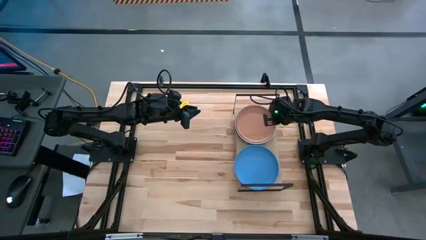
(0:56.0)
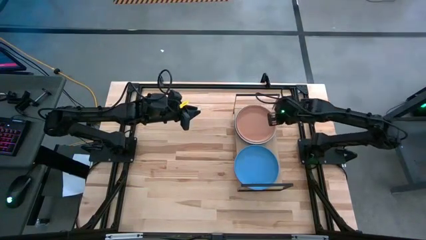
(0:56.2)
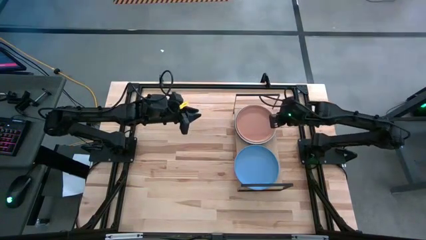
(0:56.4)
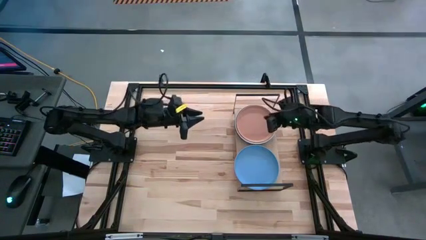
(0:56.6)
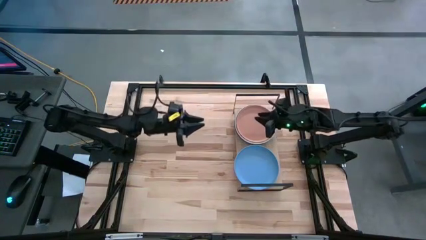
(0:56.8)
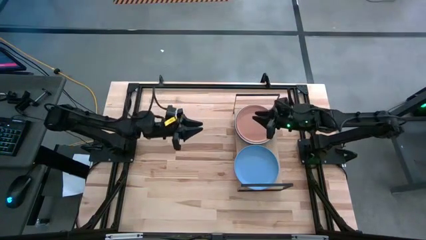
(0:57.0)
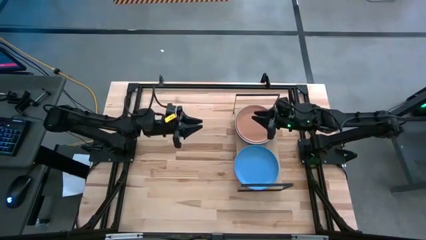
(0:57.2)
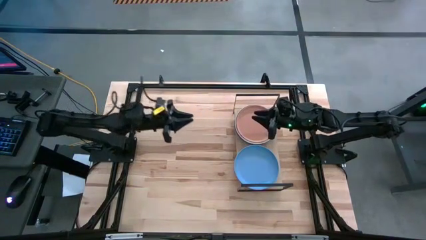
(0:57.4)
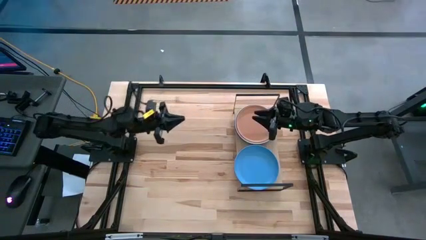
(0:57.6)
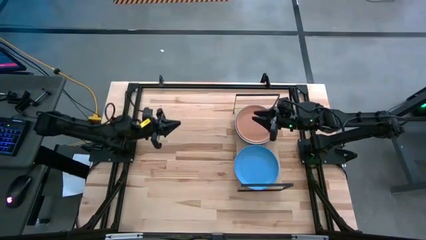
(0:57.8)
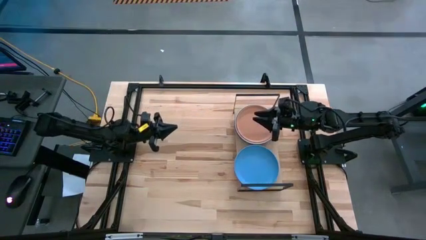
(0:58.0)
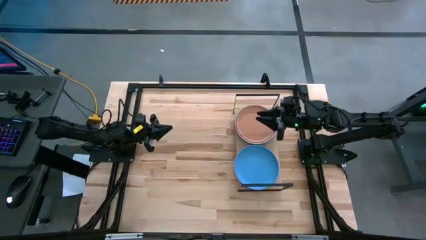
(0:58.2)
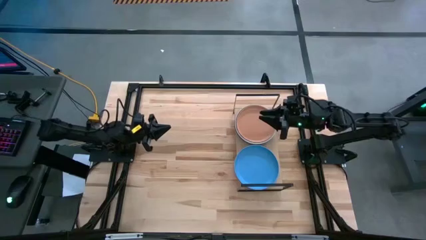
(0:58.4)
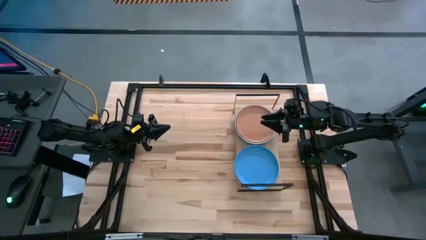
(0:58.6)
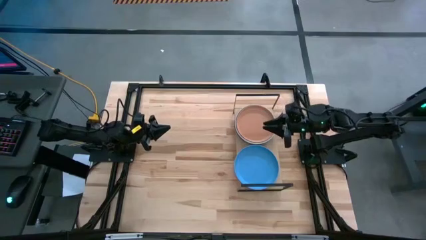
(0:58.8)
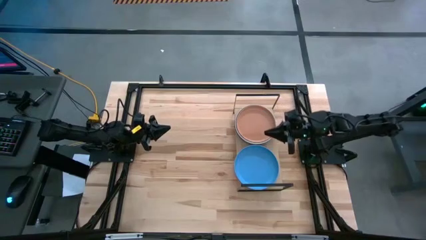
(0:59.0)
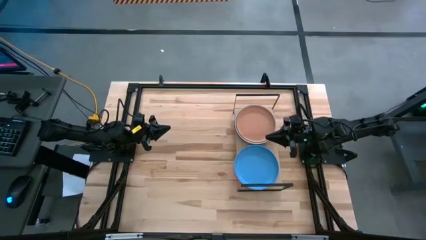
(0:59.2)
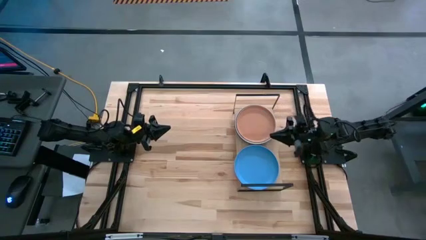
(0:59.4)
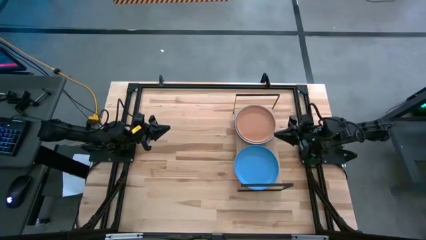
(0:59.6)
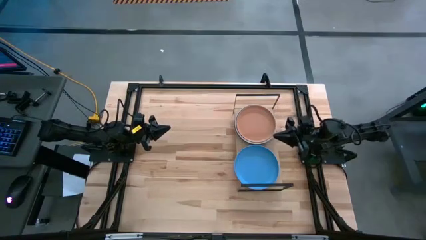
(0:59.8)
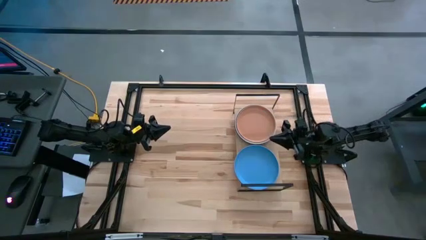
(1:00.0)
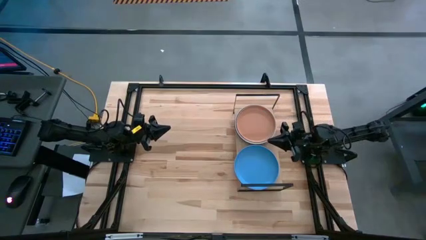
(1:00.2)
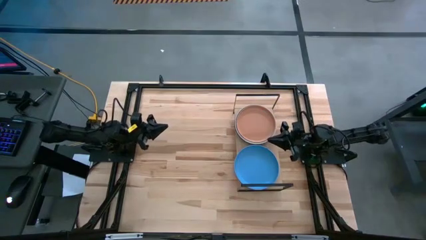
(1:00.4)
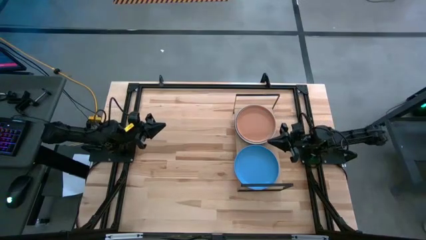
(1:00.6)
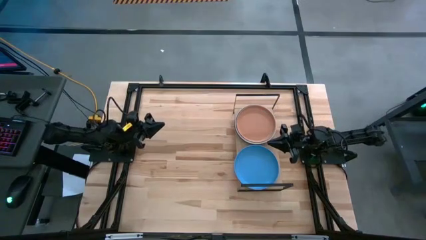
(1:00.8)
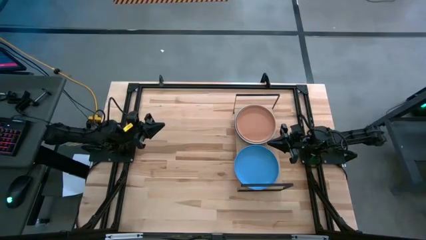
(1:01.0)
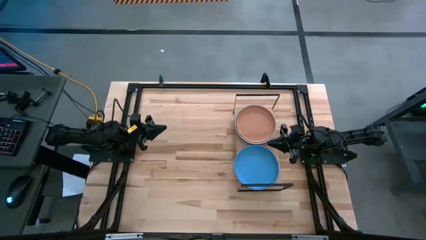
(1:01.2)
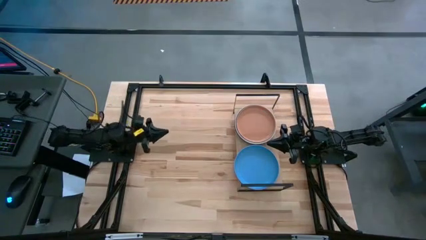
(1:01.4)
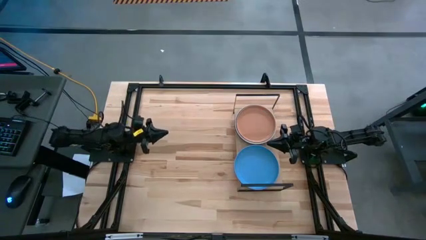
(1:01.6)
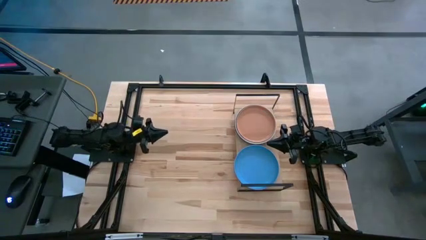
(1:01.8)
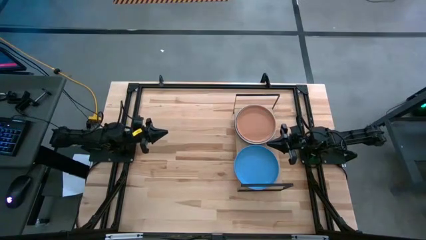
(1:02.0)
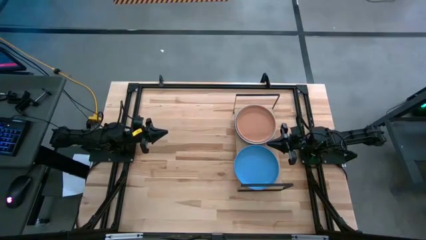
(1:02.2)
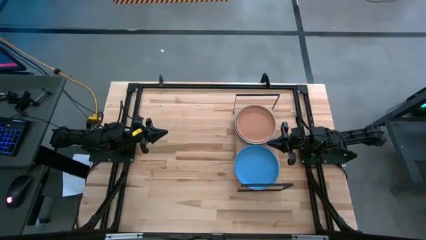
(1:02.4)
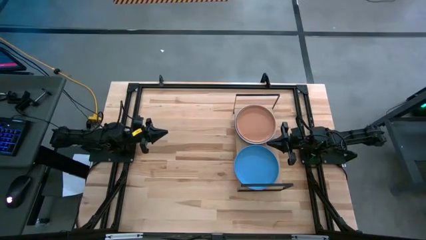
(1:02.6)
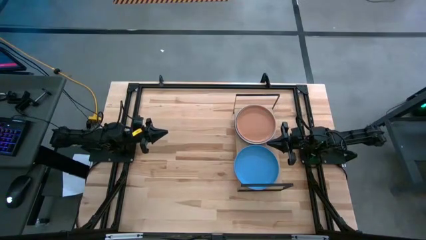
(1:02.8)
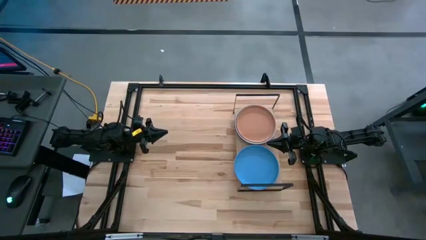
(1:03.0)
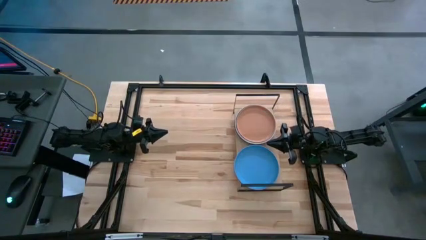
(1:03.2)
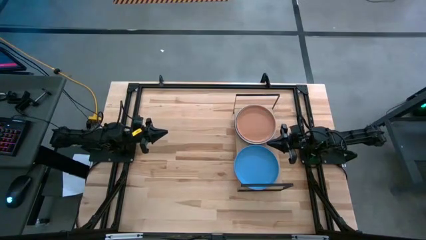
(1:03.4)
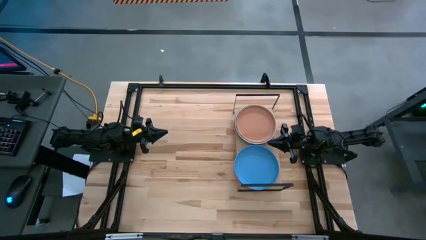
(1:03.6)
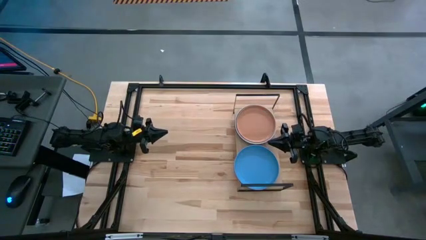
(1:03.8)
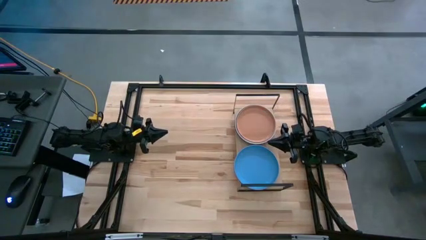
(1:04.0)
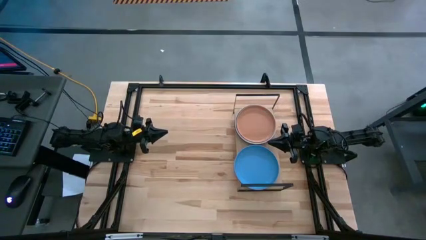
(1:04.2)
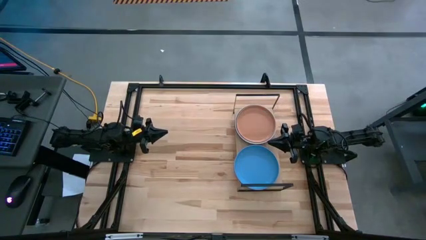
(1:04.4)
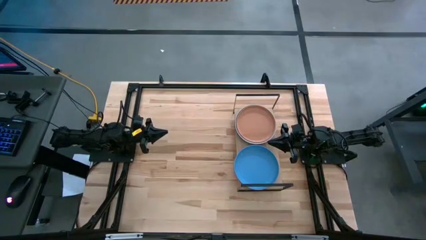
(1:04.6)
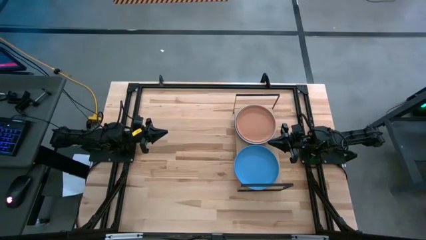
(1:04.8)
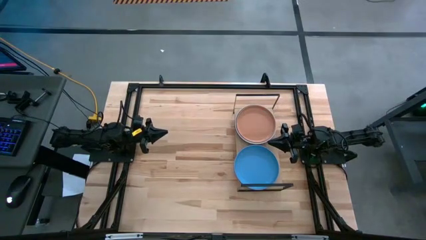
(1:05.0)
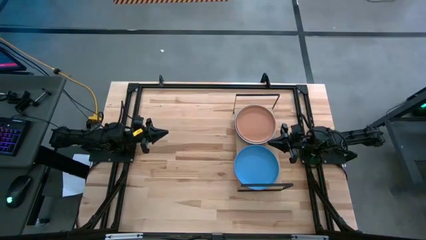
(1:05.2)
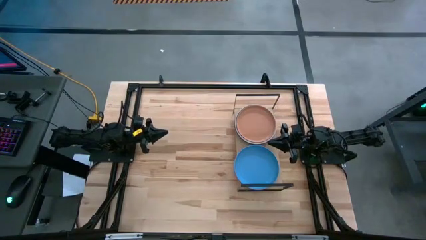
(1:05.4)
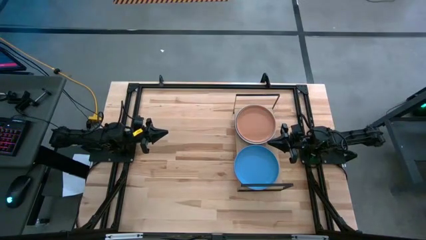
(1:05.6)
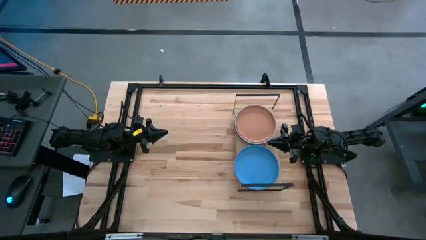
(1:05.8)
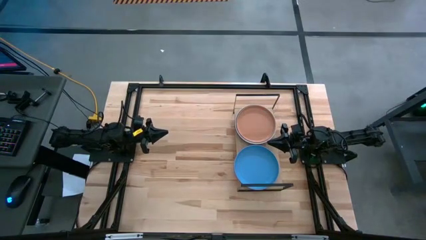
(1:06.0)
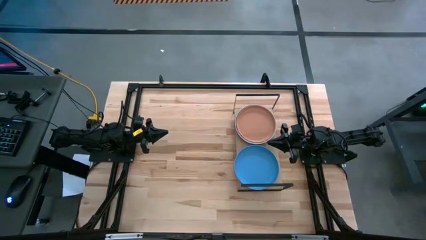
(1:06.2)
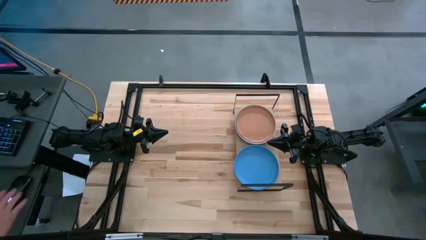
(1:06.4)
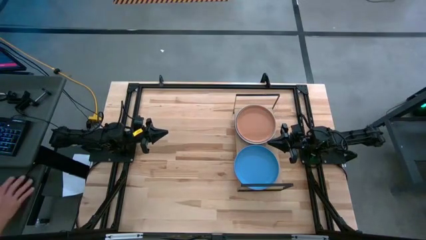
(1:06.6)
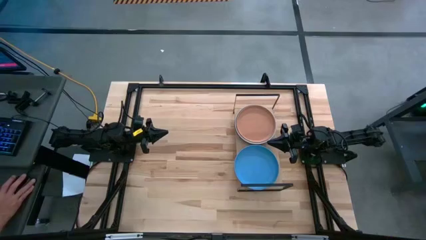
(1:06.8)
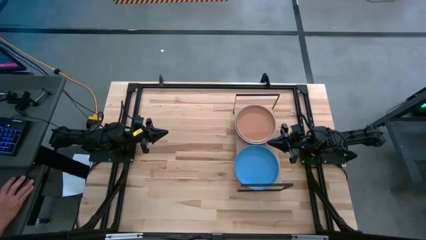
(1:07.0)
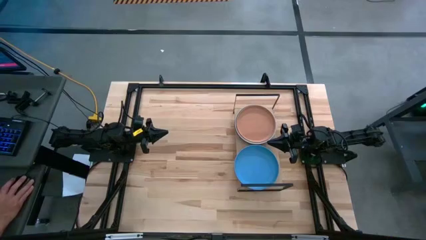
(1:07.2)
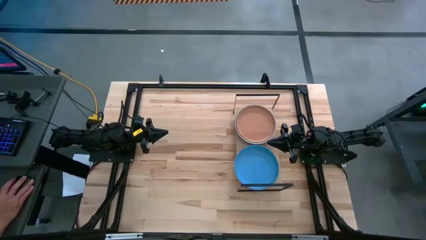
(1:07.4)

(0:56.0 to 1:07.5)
Task: Place and stack plates onto a shelf
Return to Home Position

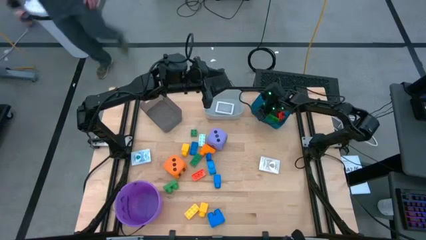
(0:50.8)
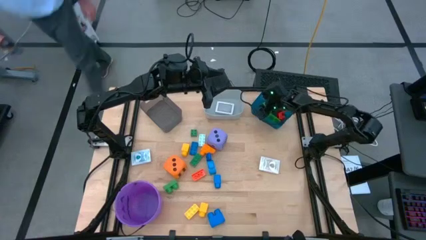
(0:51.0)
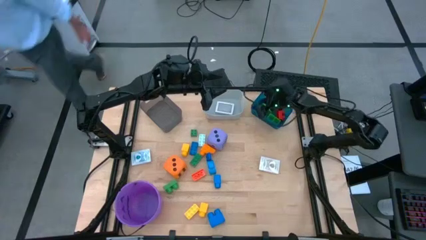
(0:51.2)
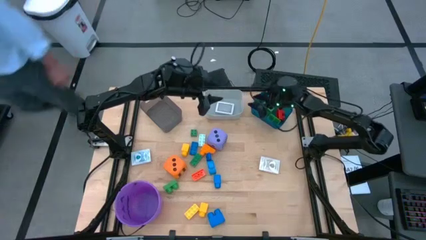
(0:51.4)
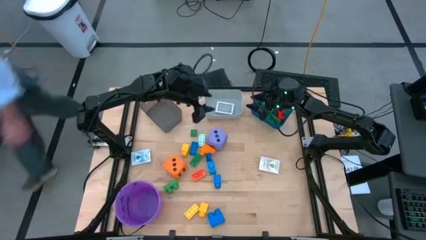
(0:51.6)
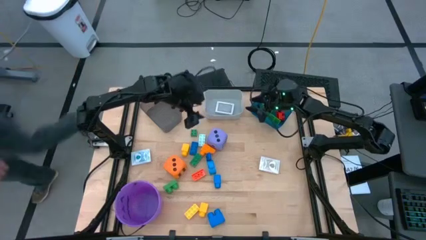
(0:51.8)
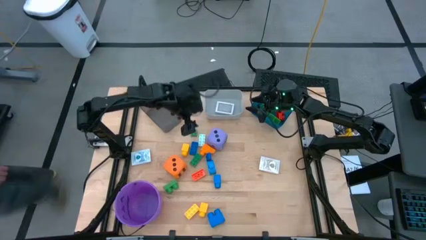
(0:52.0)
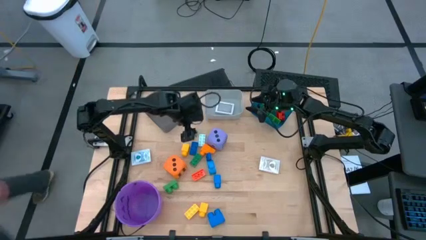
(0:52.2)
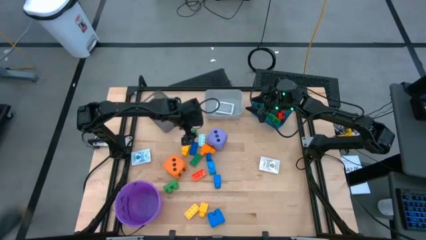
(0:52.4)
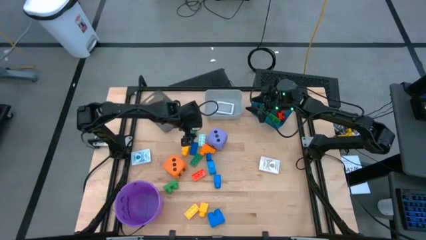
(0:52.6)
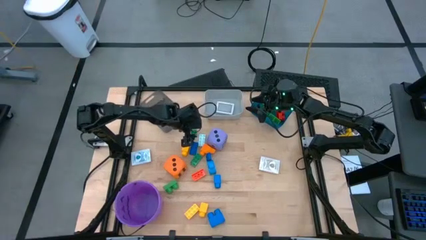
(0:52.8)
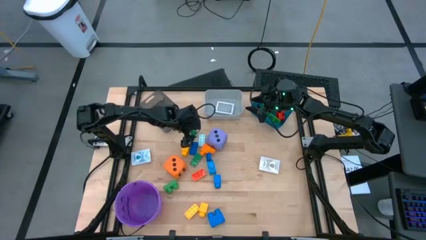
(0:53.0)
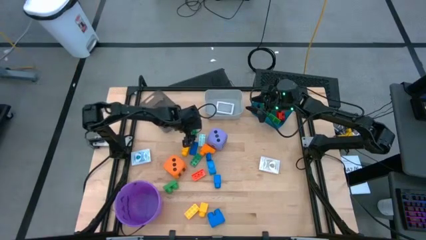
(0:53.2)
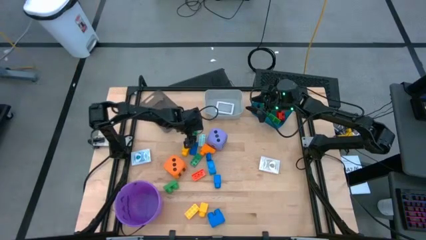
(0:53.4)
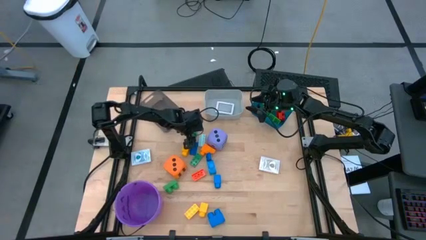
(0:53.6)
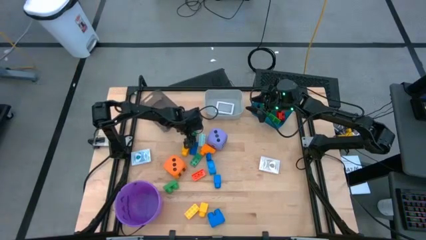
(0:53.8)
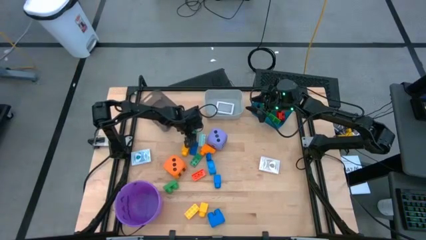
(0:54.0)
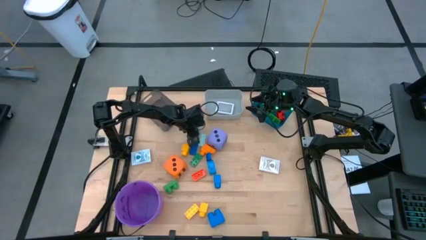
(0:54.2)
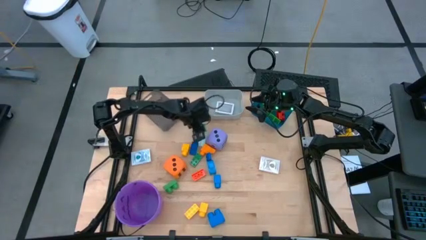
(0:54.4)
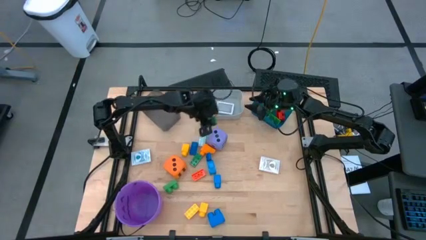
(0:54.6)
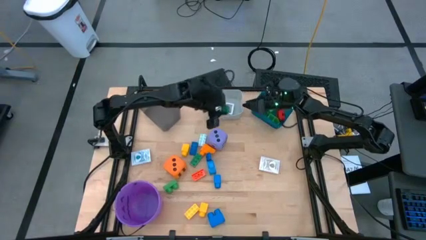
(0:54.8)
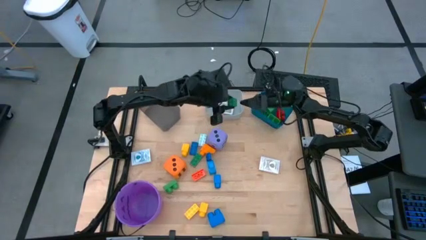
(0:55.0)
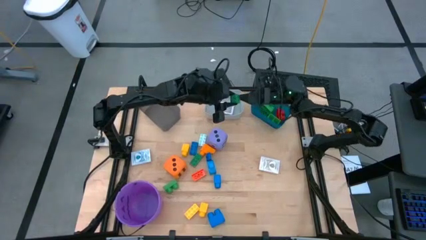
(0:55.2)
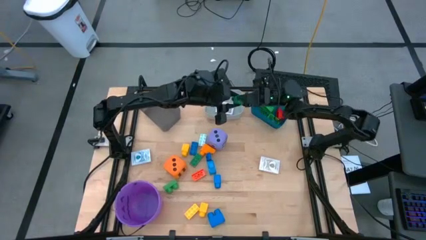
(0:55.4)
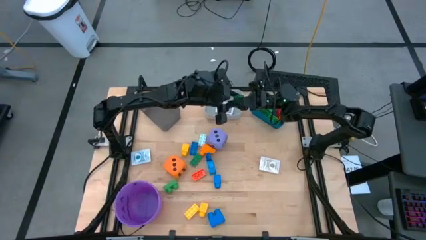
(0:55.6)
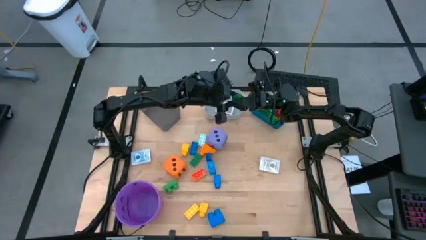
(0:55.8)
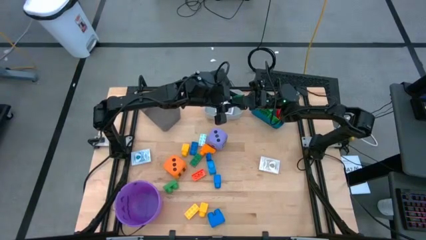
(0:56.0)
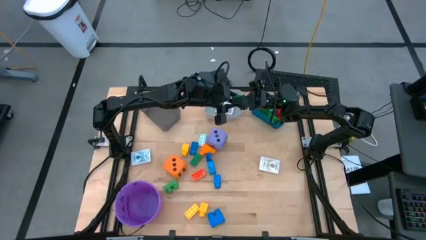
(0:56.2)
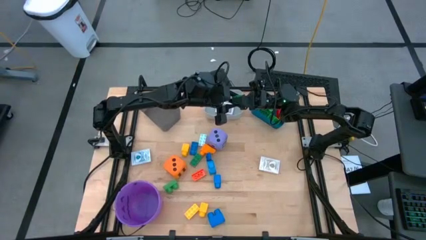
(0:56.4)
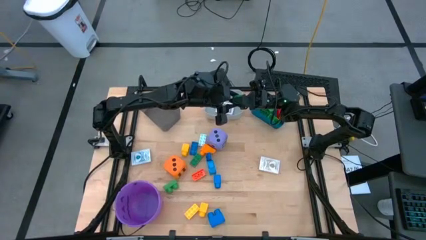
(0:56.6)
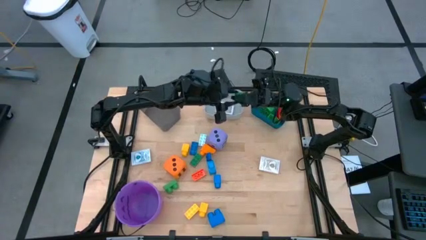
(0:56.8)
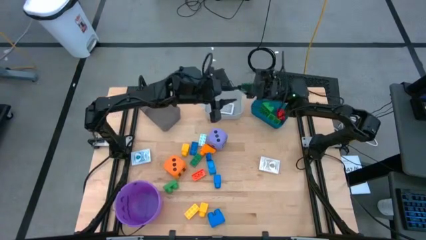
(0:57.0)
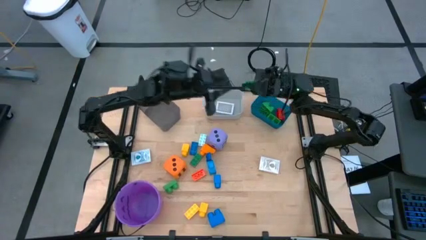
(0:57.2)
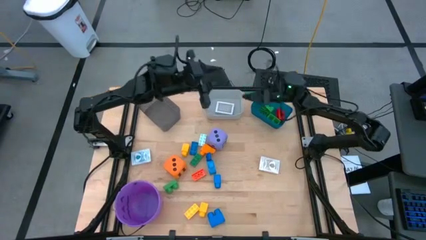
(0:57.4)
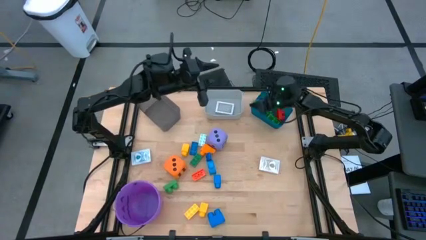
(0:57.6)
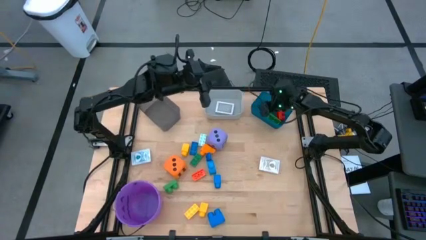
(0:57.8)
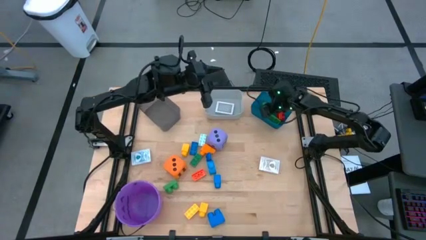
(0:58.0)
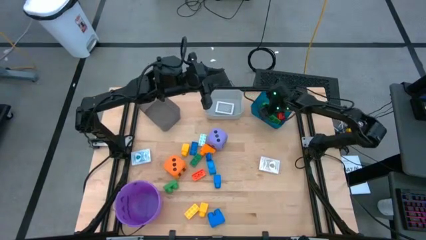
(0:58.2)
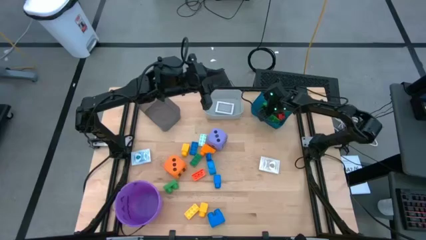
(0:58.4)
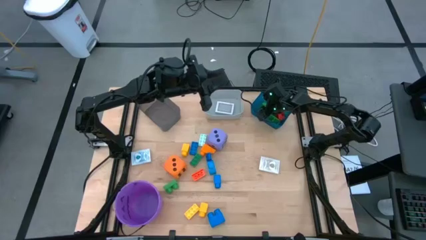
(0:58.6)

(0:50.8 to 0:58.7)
Task: Pick & Place Toys
Put the dark green game piece into the blue bin
